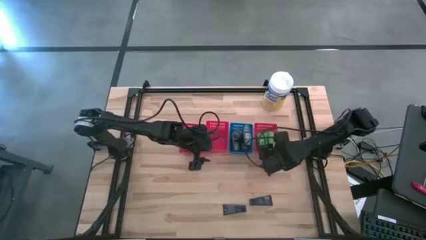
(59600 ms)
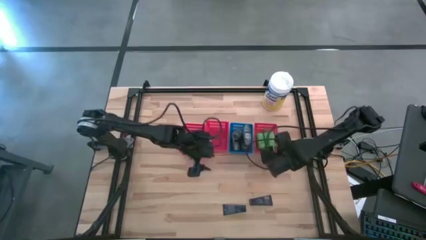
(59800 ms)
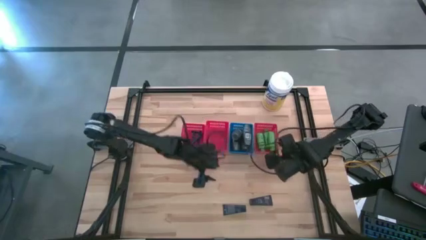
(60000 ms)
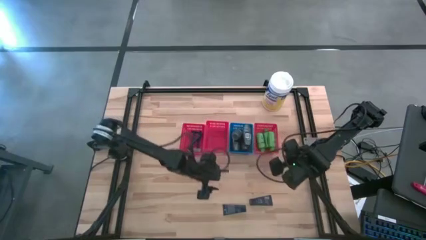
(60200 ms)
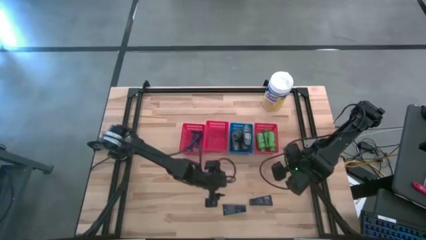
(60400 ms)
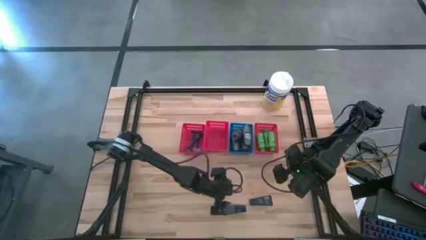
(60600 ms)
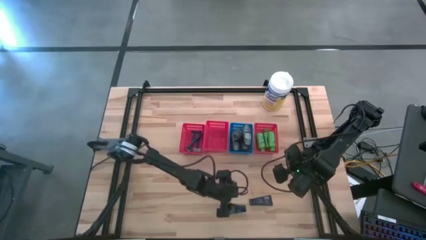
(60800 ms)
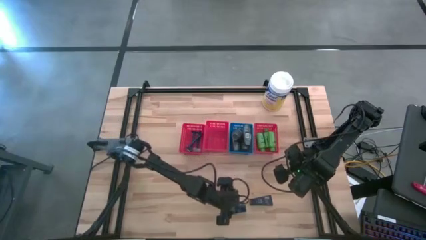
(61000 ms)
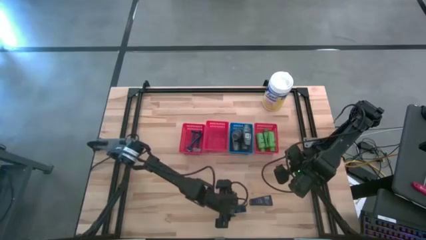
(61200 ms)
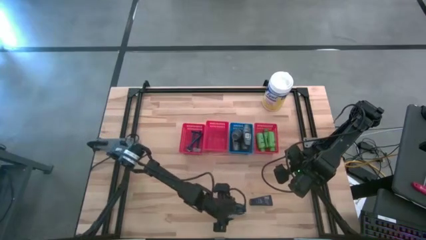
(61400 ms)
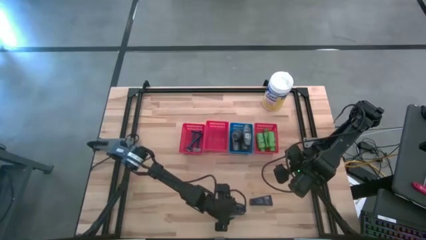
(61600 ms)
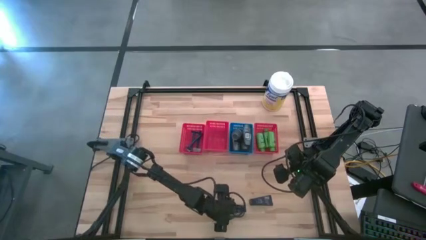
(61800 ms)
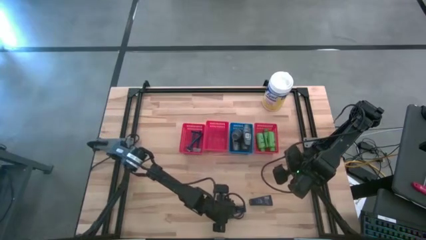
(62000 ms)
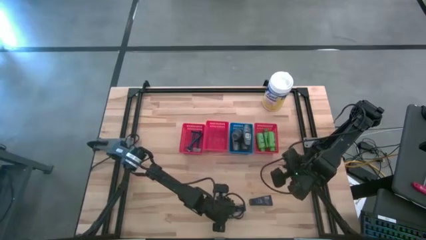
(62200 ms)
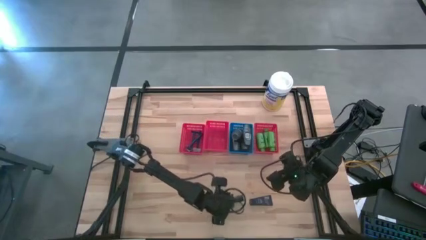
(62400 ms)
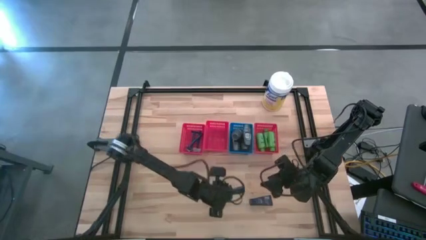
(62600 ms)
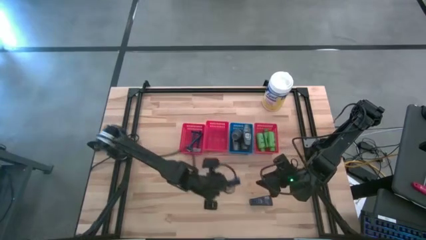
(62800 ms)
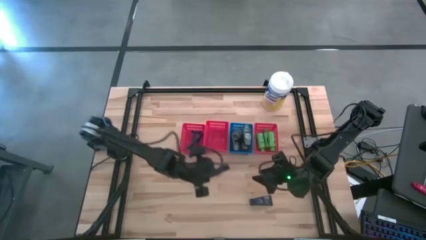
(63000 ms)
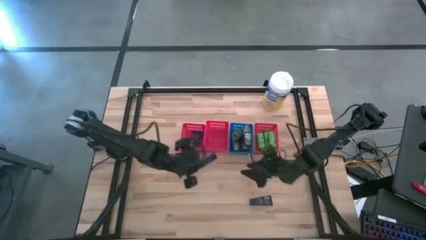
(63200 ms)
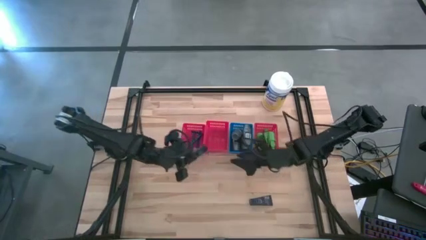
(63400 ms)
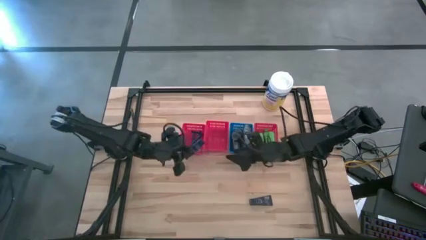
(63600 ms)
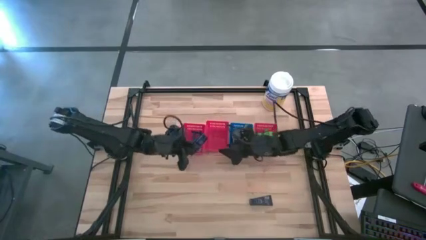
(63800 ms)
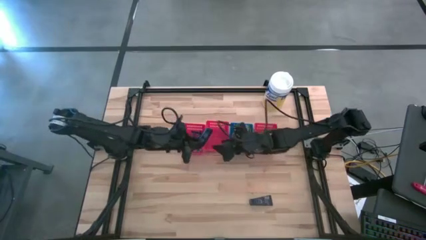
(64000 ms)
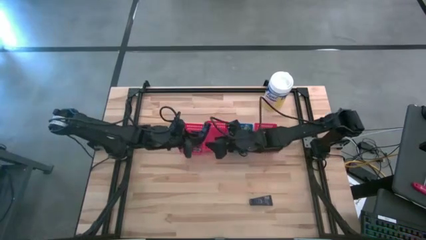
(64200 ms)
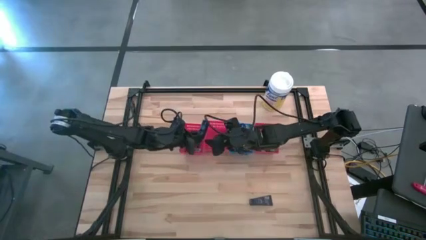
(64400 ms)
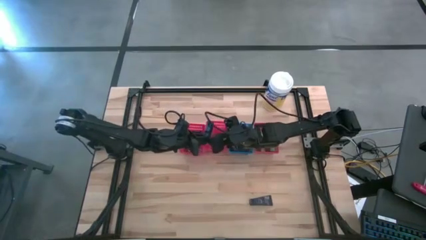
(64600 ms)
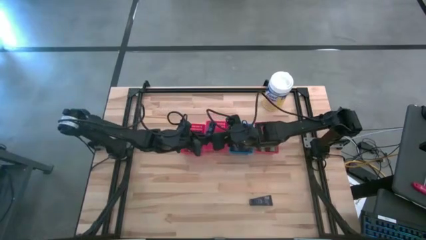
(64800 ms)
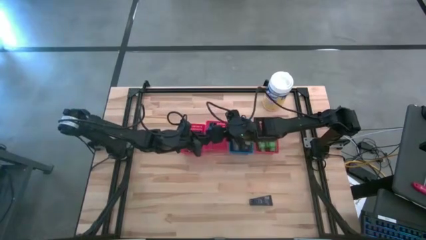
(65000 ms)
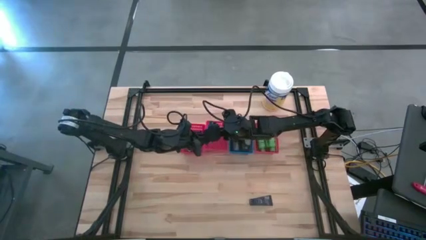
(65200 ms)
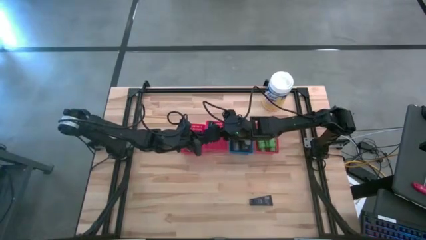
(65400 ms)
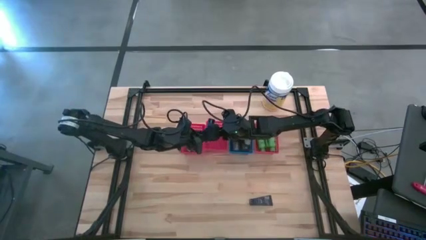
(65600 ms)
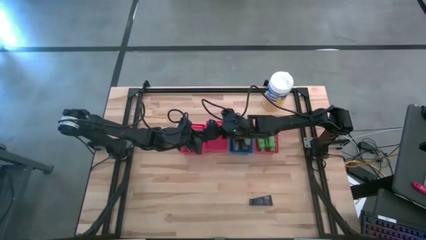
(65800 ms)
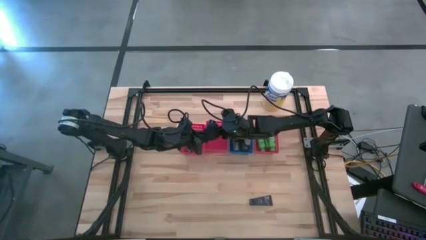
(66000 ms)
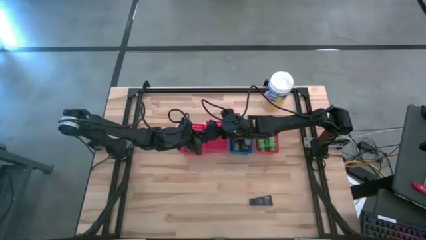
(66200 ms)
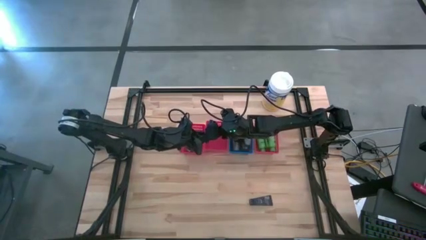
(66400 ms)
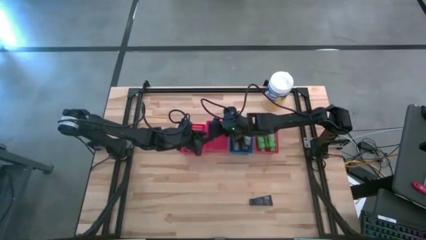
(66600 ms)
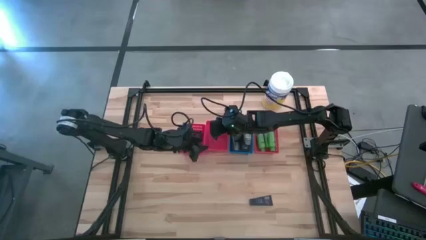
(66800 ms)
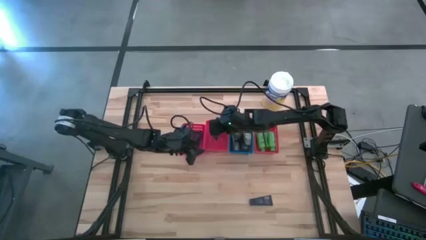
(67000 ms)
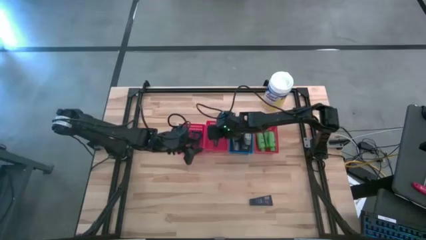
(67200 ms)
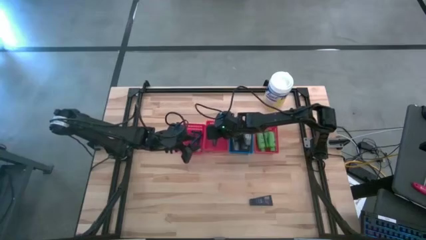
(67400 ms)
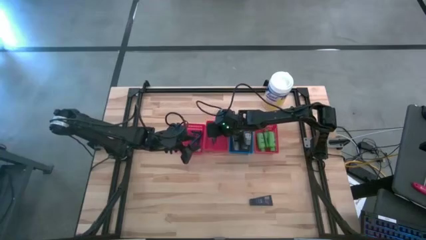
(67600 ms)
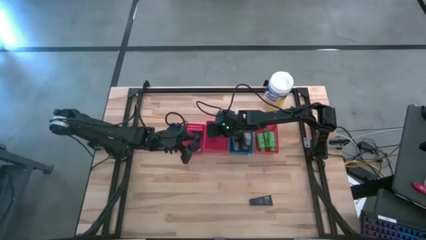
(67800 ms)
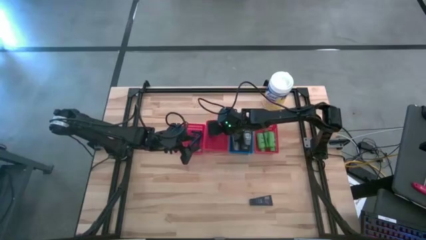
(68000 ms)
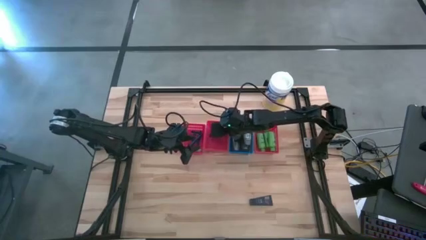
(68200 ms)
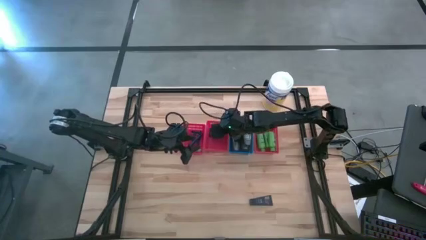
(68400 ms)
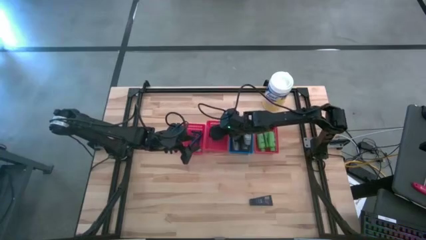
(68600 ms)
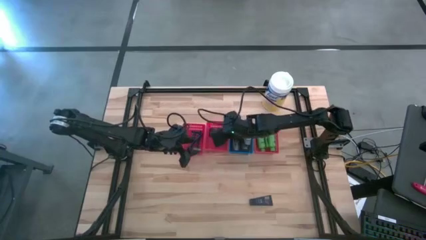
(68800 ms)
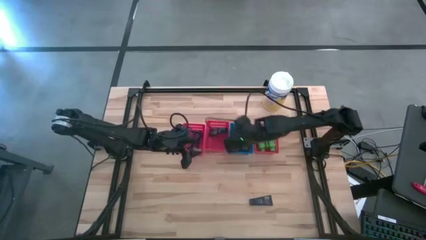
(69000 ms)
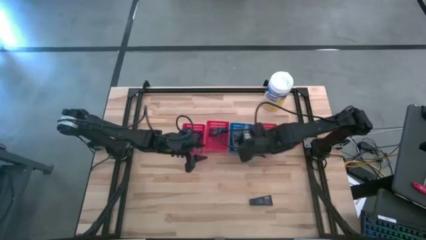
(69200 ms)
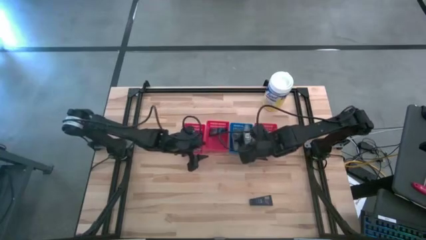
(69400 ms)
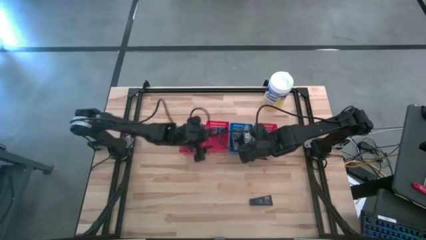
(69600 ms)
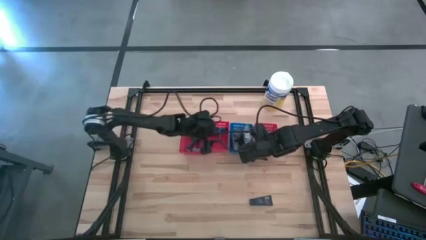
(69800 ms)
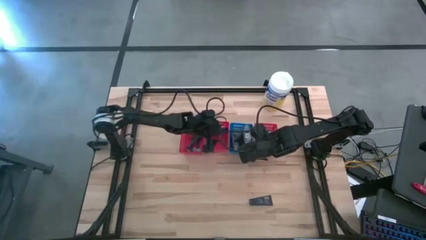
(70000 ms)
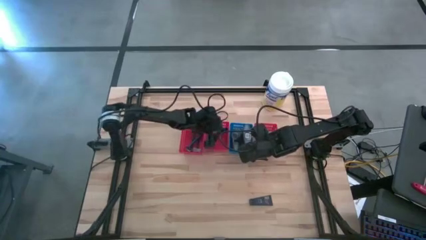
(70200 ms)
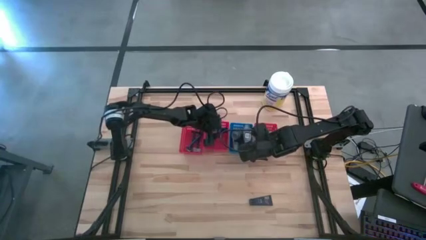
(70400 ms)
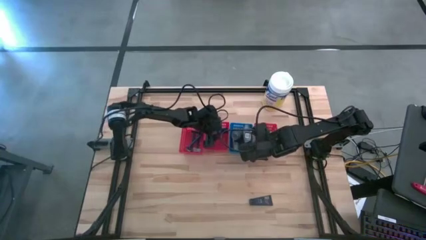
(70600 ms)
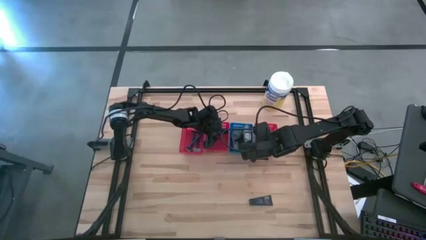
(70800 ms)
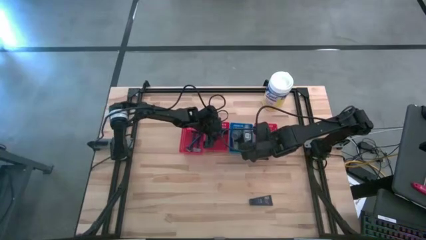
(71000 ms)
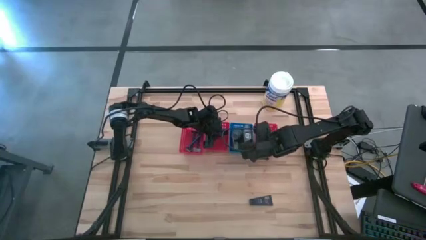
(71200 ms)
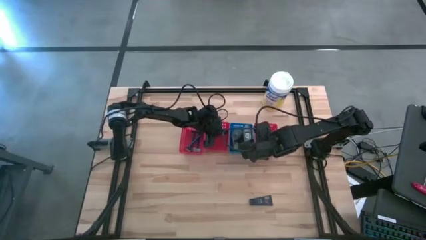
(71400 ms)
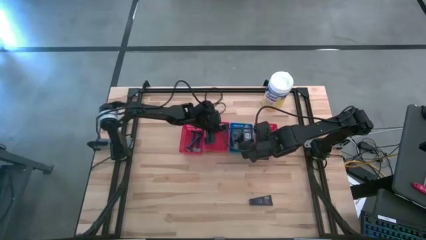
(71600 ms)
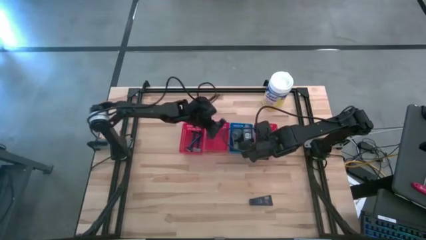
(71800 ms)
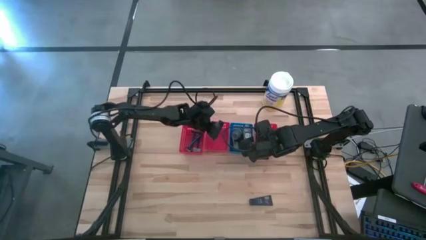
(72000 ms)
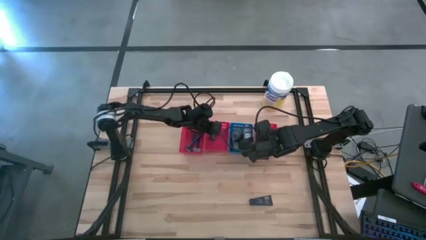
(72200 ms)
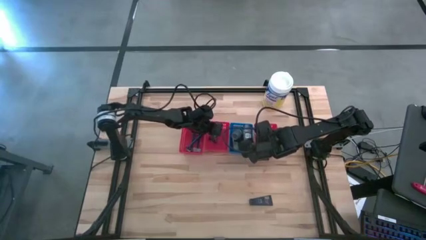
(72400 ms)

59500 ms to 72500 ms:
Task: Pick & Place Travel size toiletries
Put the blue shave cream into the middle red bin

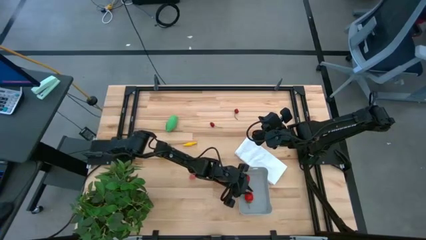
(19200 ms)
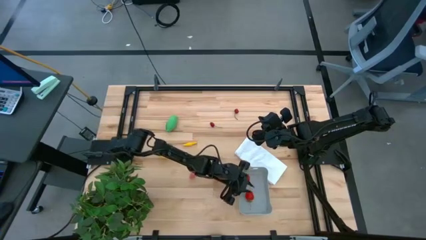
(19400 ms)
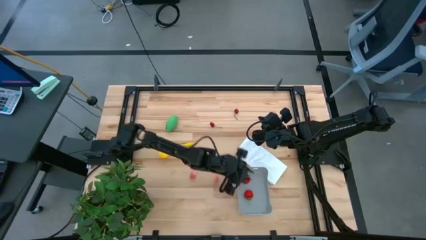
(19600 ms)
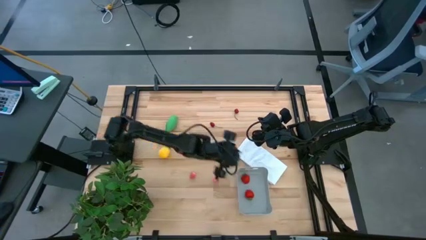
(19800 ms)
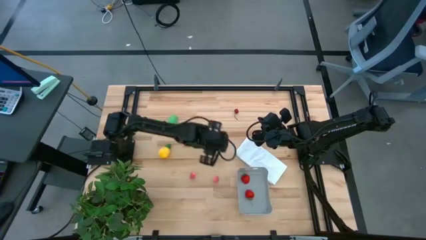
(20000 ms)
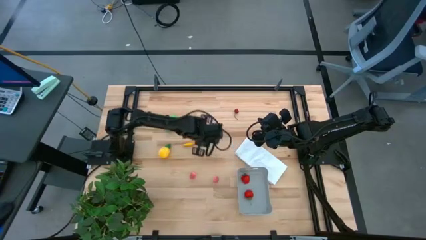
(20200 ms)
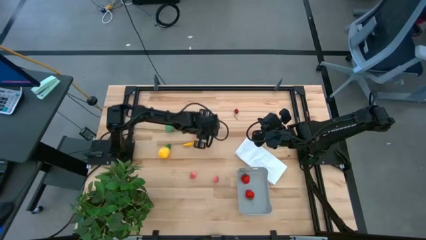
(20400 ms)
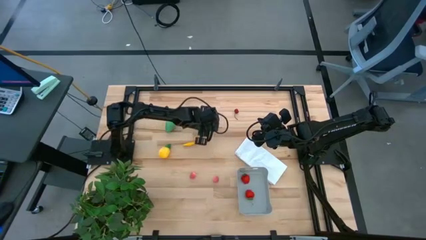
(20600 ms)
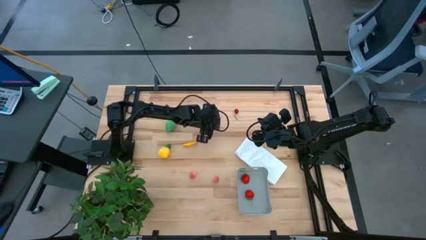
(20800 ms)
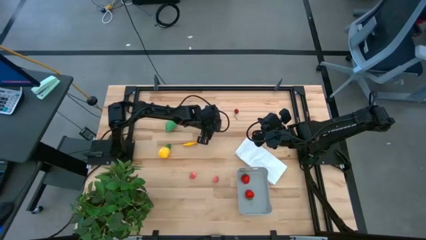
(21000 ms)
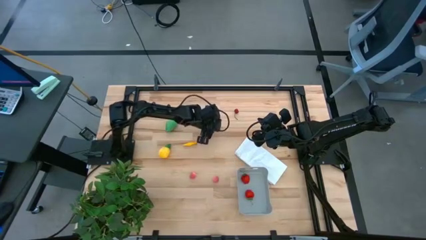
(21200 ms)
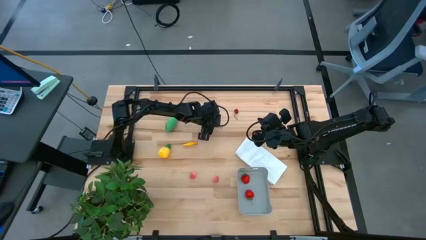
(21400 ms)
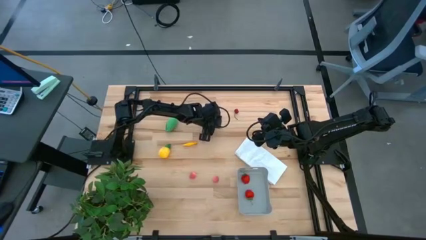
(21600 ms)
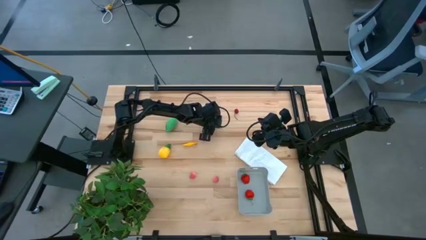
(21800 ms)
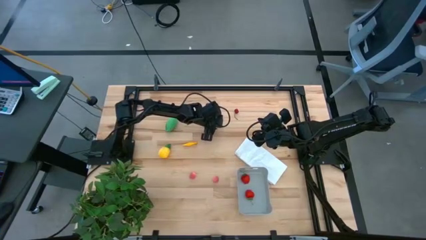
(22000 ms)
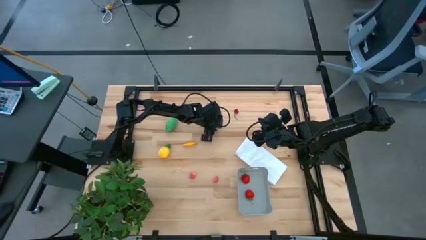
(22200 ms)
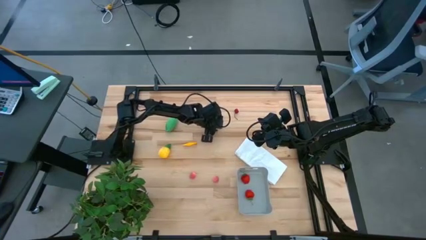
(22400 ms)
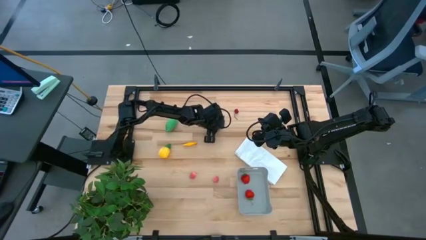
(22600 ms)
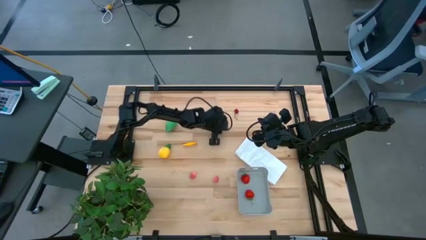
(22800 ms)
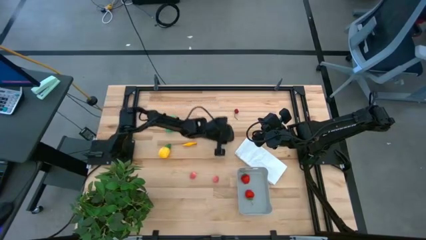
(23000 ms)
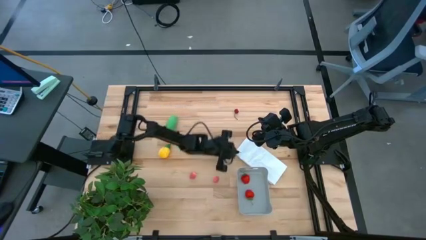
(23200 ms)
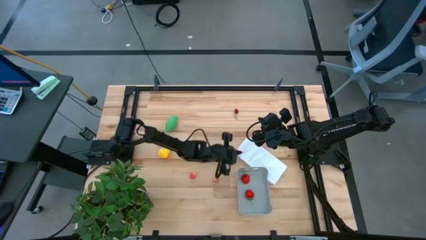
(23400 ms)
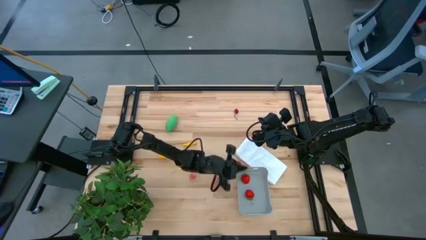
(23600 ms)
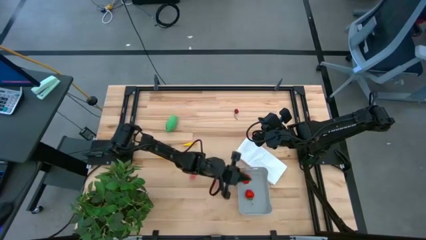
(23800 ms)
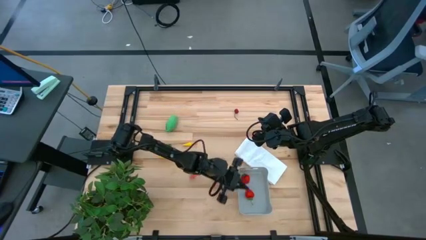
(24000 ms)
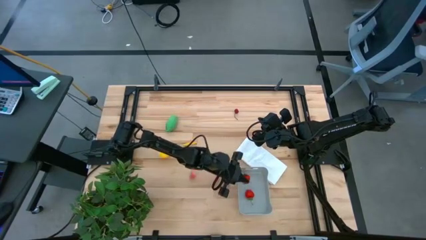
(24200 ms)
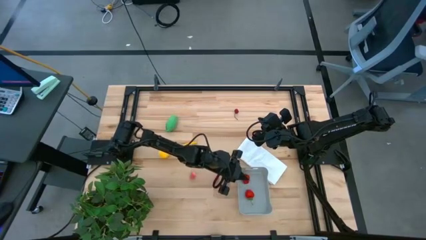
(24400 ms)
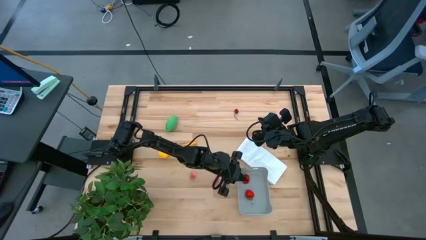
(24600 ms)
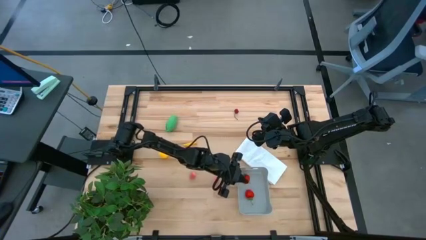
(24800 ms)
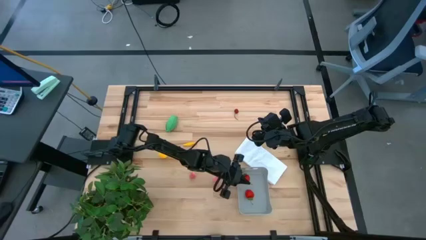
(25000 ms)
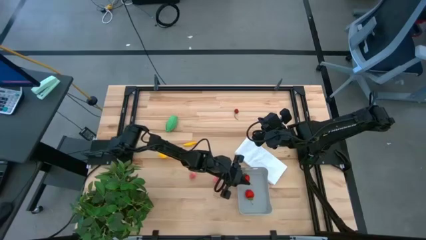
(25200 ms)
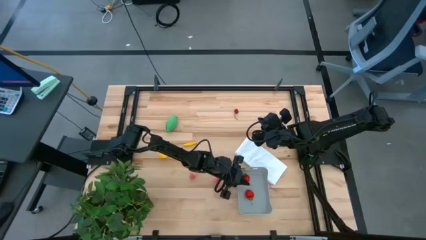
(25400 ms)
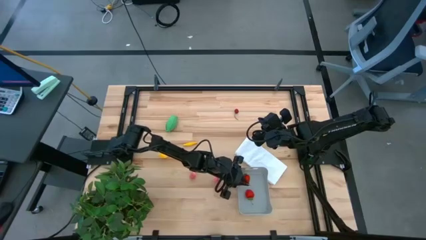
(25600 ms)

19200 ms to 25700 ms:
Task: Pick and placing Produce into tupperware
Put the left red cherry into the gray bin
